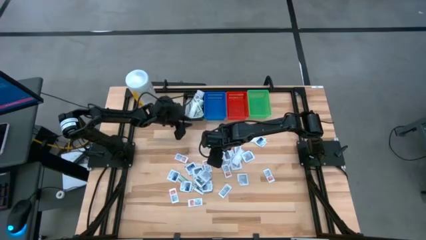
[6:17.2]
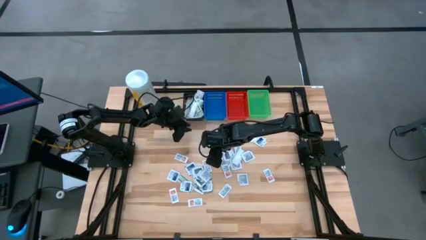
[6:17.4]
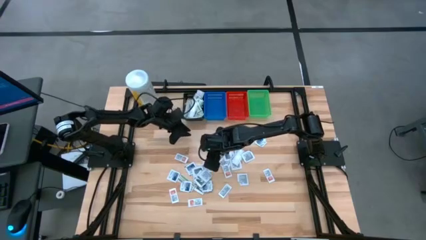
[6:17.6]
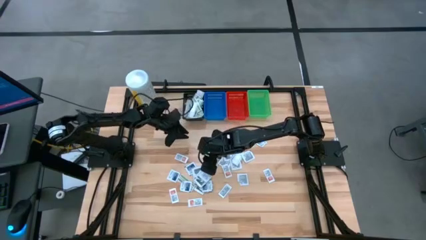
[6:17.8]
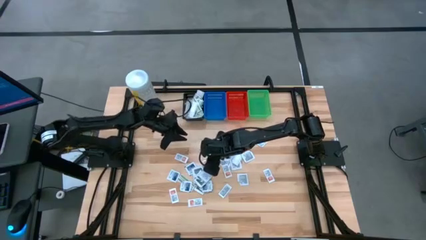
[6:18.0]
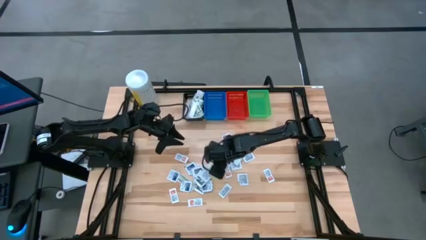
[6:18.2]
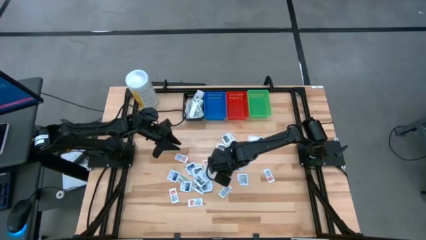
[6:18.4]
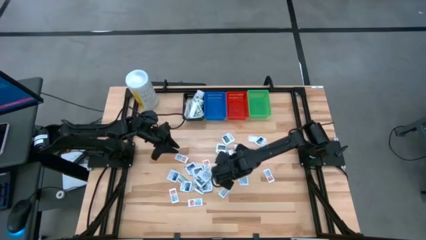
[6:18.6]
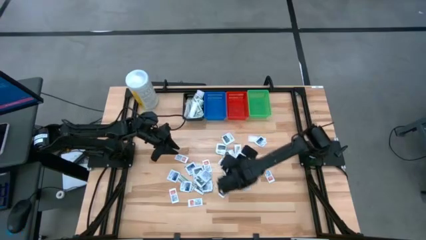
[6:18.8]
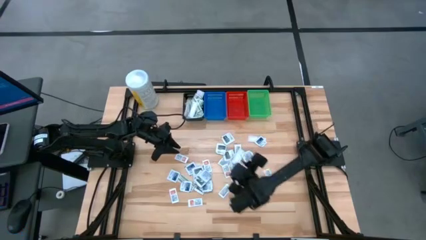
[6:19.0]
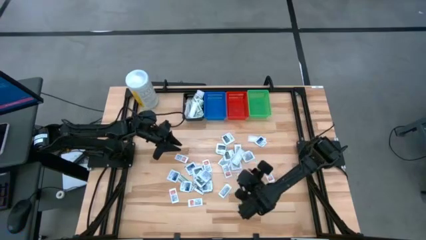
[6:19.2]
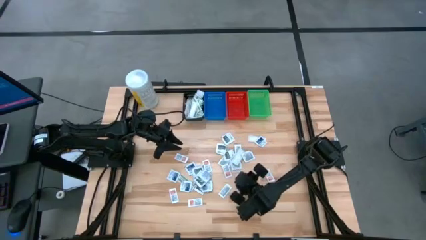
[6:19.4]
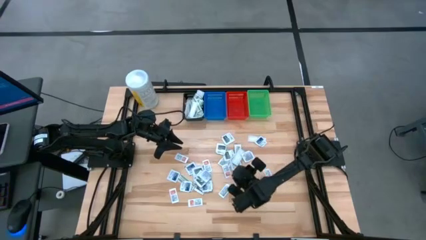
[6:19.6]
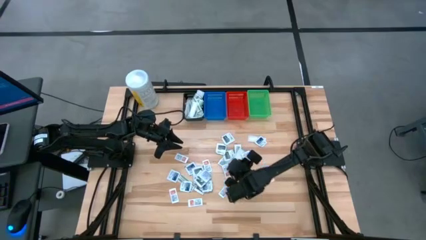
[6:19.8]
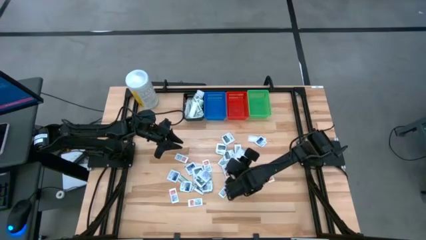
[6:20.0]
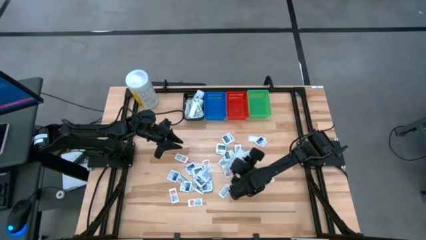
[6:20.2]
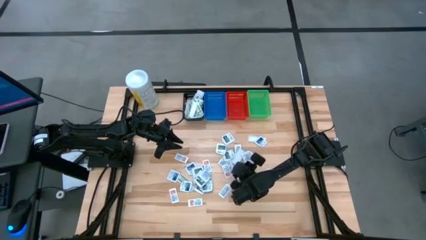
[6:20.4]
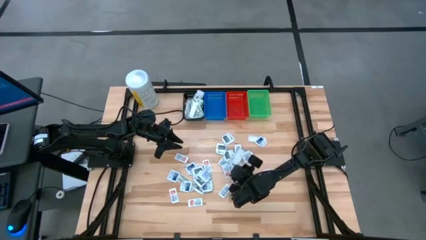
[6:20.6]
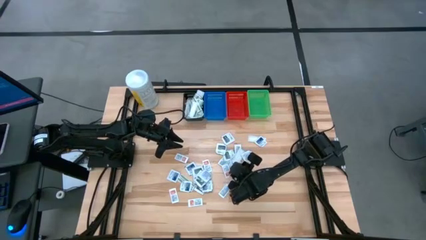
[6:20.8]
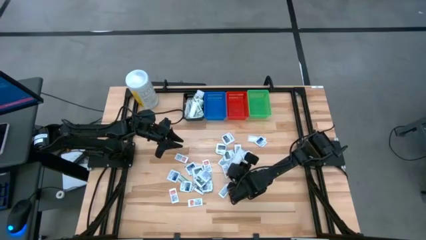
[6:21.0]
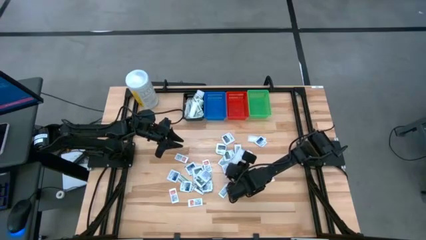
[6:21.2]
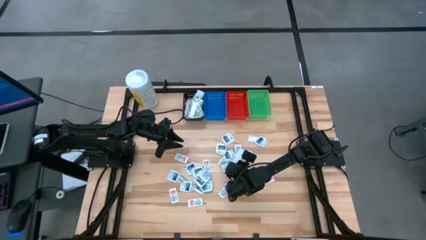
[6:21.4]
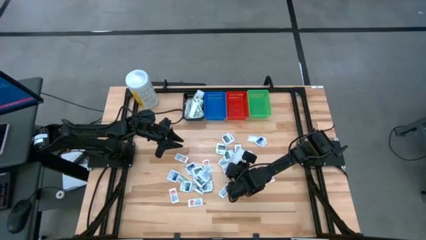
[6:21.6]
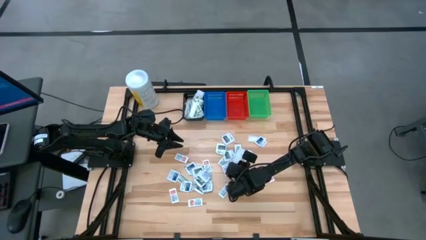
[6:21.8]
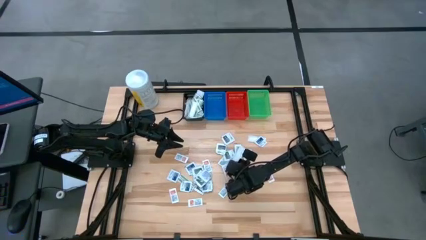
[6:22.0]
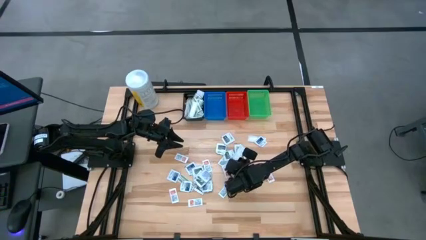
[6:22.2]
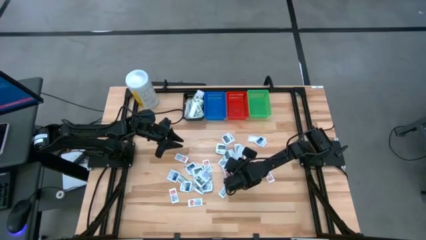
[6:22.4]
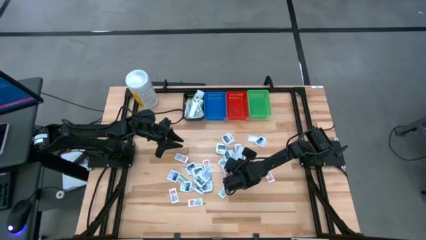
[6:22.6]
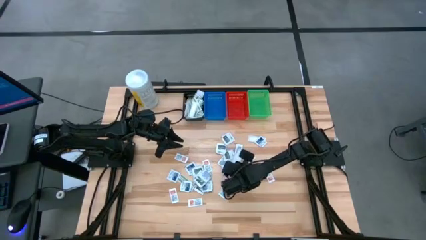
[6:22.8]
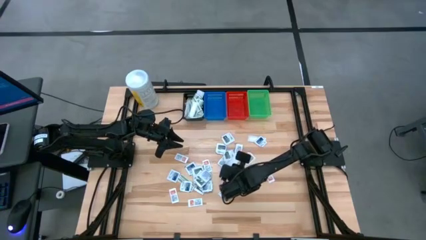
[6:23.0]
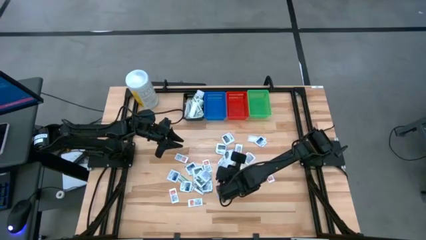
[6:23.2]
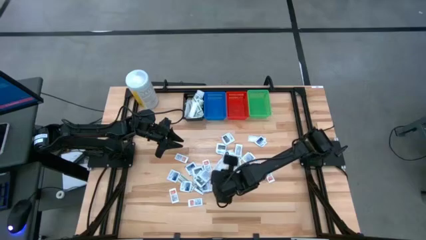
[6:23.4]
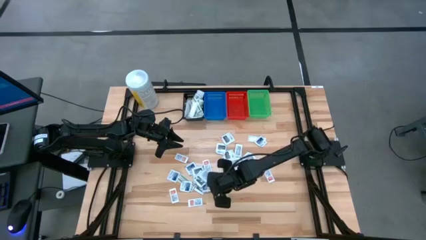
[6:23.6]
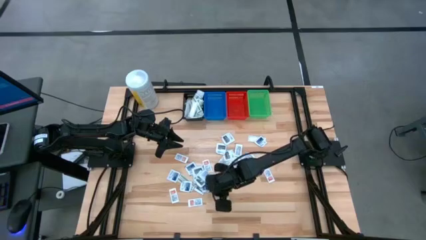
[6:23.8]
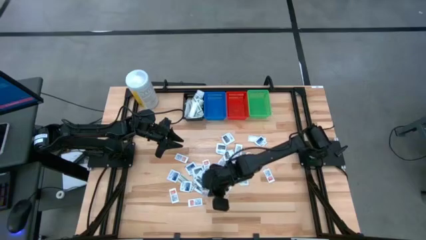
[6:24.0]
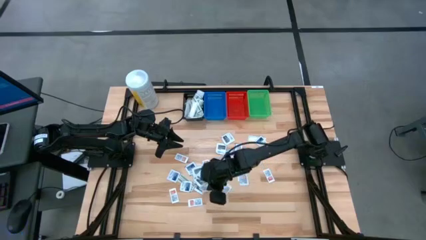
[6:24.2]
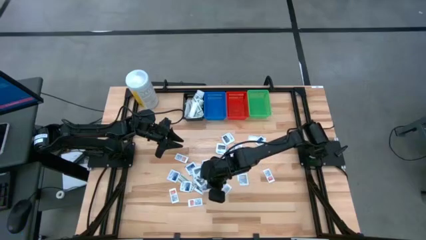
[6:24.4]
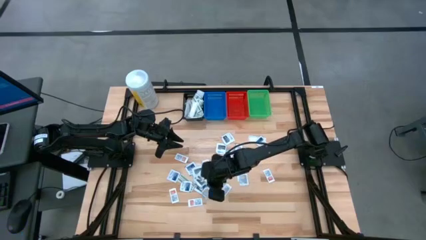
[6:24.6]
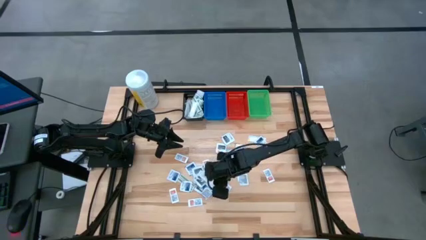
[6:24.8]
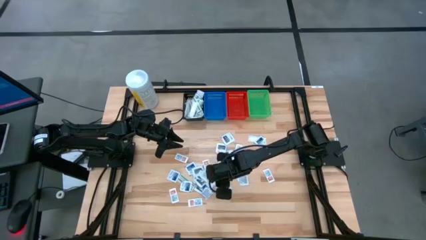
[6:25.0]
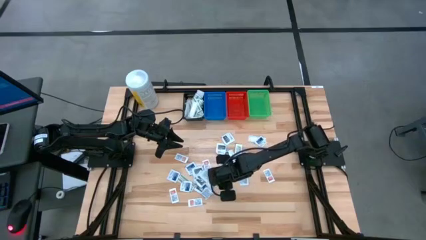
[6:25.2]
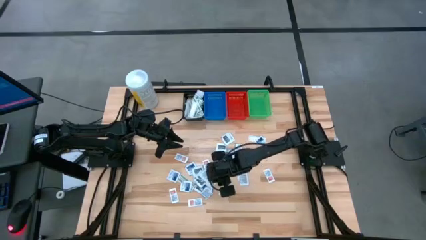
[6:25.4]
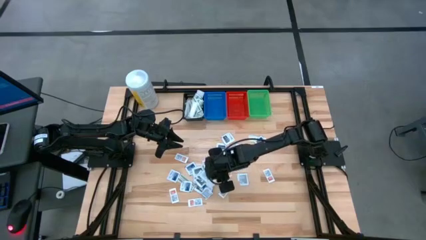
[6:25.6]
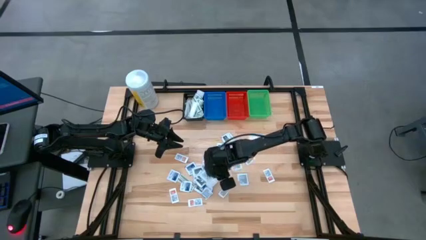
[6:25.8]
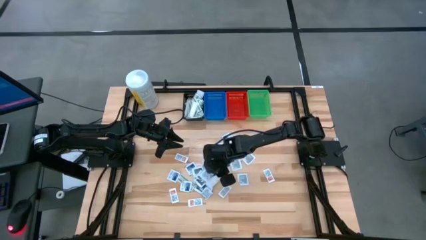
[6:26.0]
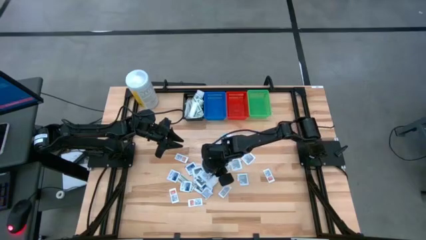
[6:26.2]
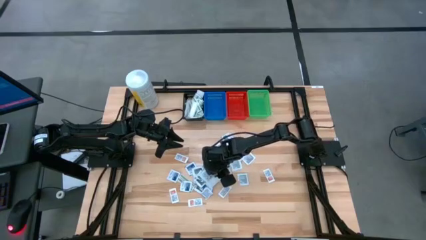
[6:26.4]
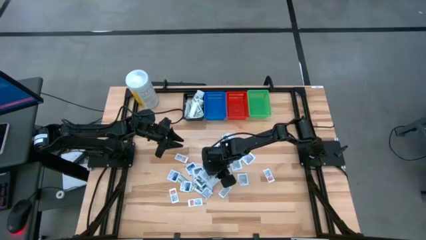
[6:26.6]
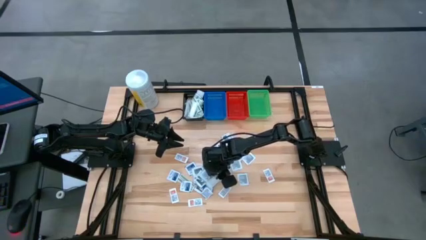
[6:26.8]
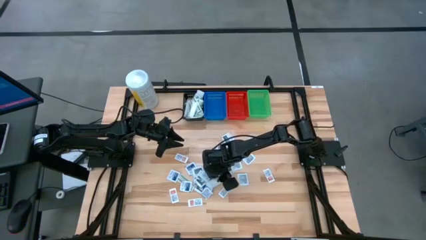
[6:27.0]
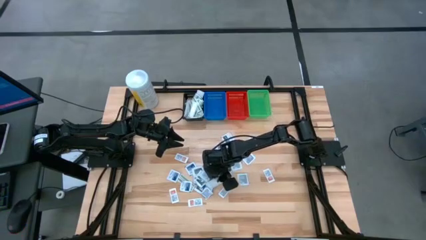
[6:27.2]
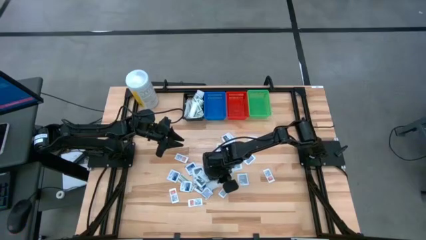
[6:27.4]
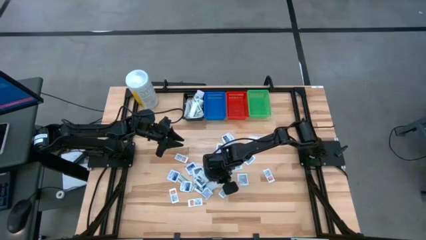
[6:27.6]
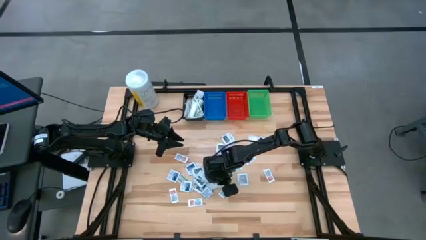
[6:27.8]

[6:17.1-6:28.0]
Task: Pick & Place First Aid Supplies
Put the green bandage pack in the black bin
